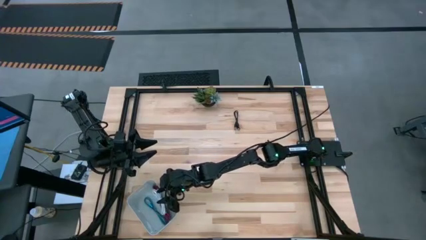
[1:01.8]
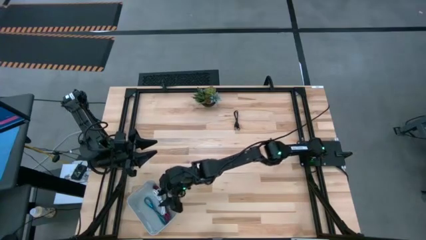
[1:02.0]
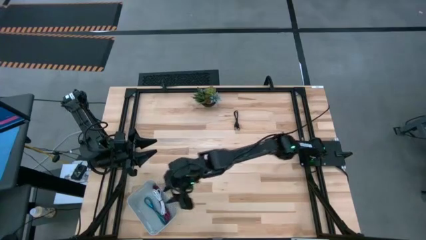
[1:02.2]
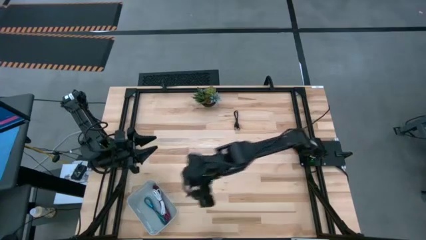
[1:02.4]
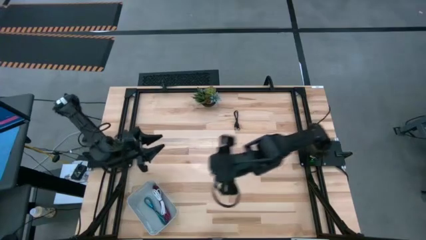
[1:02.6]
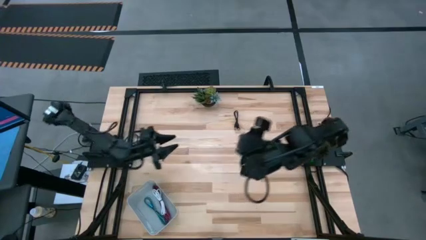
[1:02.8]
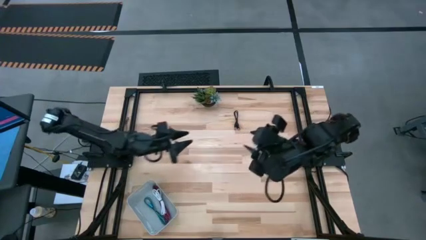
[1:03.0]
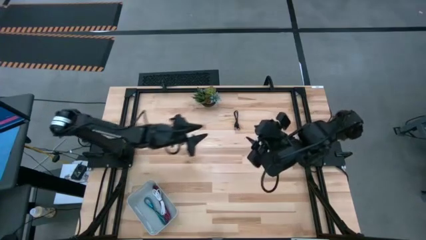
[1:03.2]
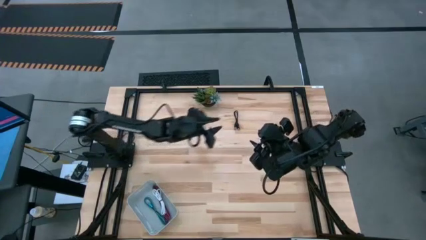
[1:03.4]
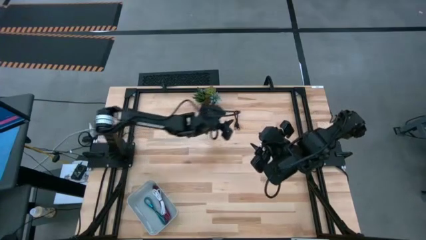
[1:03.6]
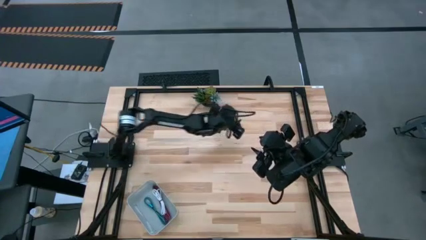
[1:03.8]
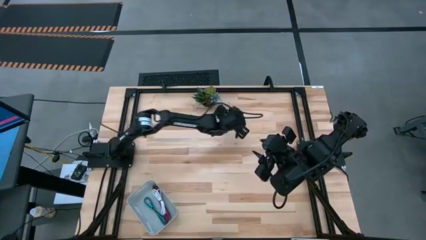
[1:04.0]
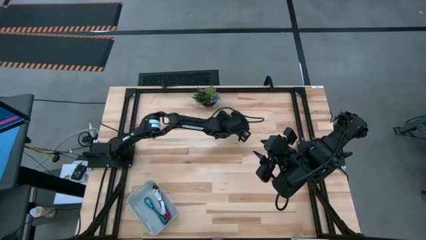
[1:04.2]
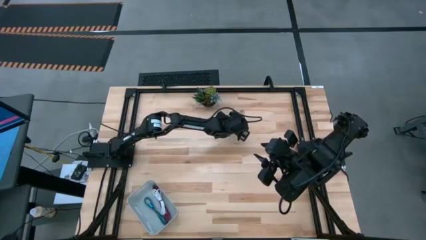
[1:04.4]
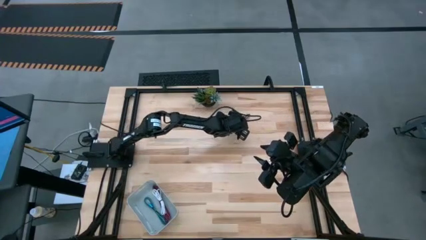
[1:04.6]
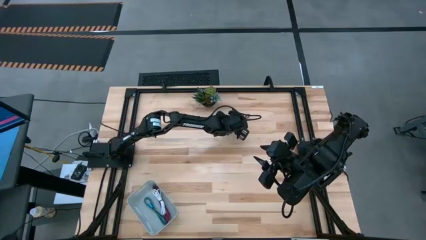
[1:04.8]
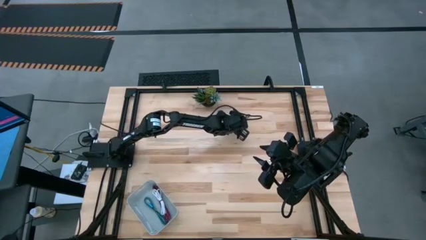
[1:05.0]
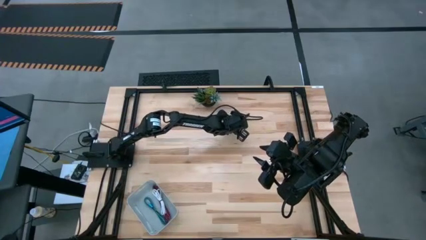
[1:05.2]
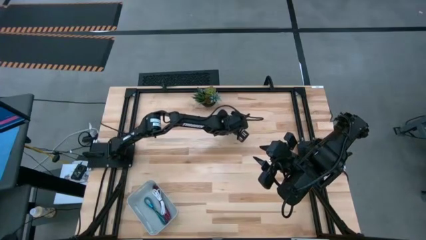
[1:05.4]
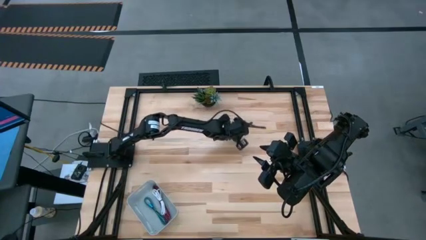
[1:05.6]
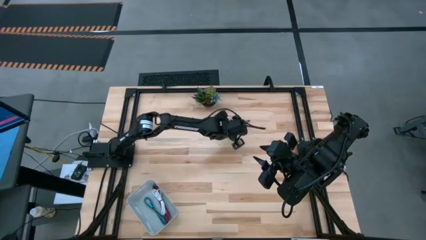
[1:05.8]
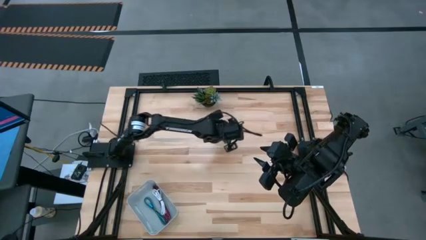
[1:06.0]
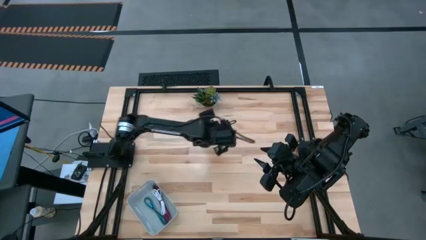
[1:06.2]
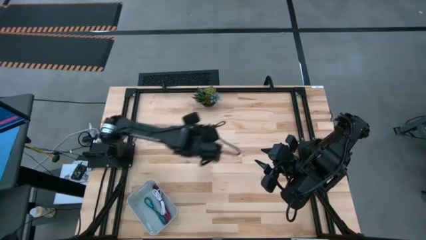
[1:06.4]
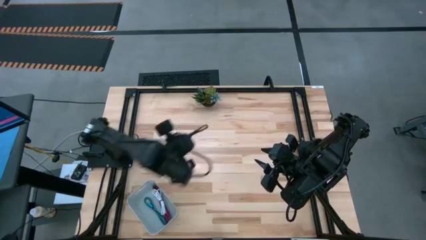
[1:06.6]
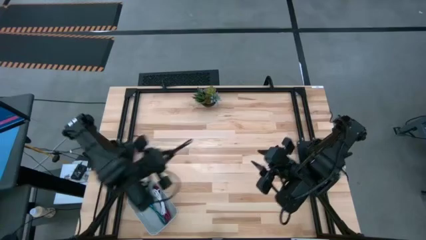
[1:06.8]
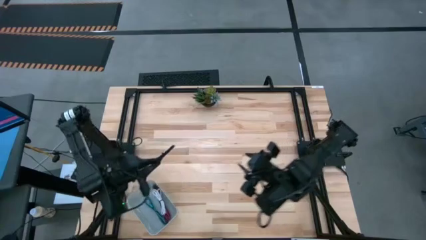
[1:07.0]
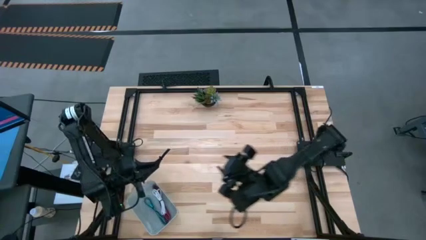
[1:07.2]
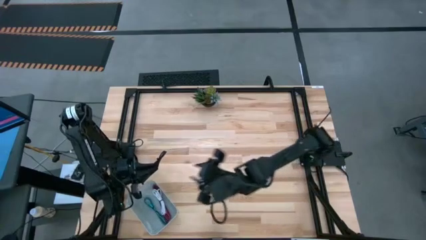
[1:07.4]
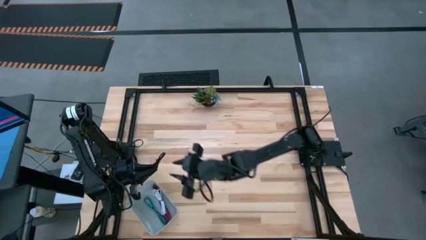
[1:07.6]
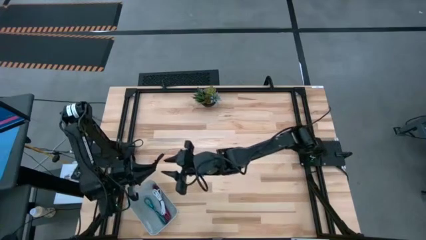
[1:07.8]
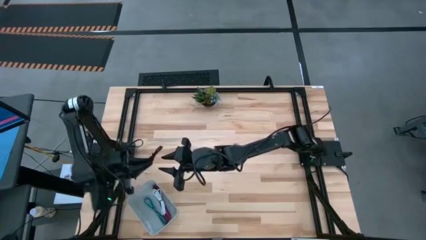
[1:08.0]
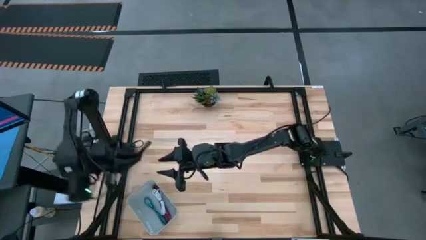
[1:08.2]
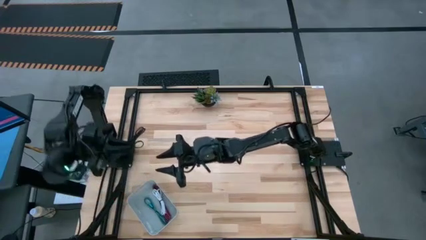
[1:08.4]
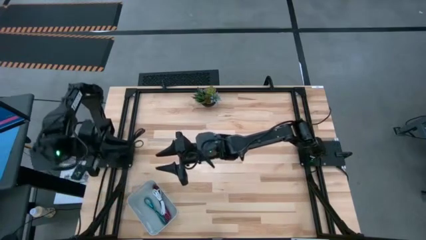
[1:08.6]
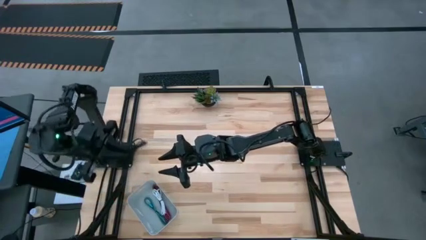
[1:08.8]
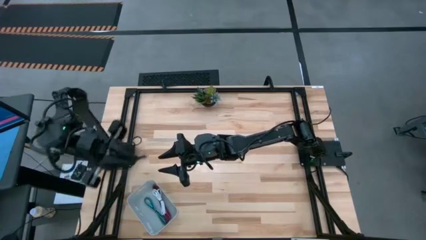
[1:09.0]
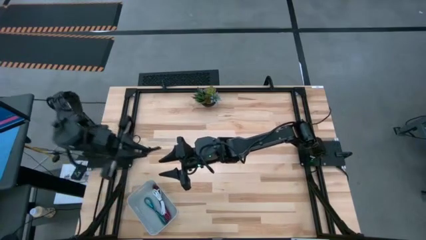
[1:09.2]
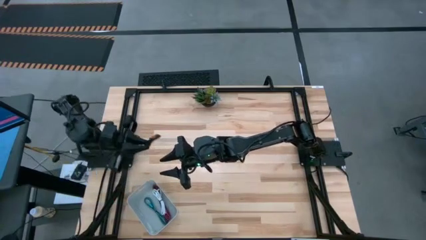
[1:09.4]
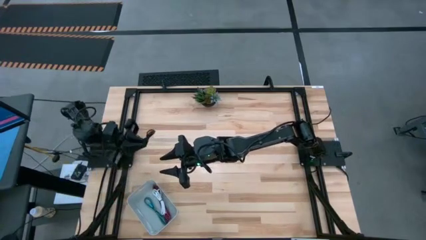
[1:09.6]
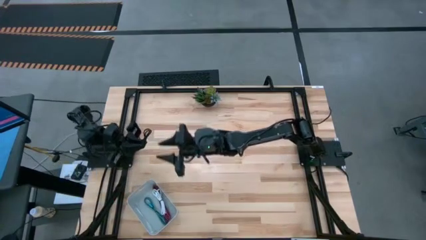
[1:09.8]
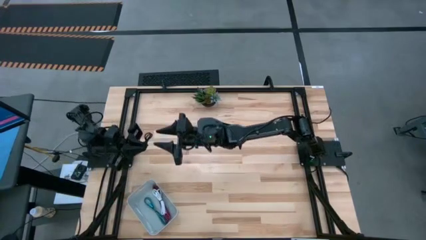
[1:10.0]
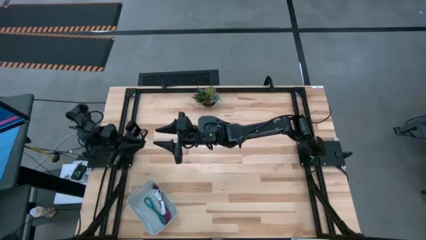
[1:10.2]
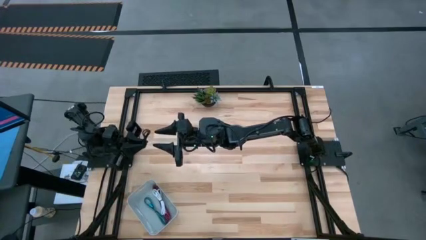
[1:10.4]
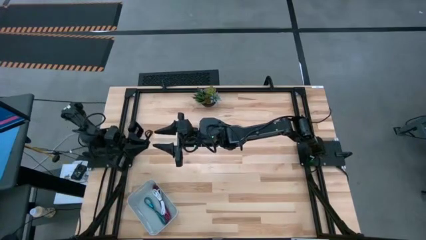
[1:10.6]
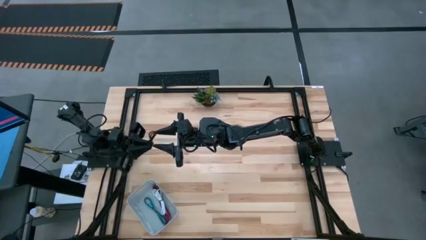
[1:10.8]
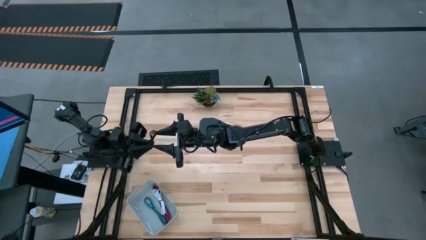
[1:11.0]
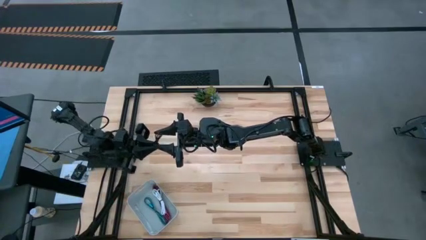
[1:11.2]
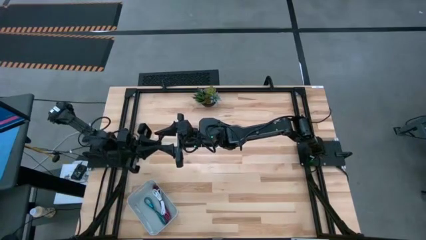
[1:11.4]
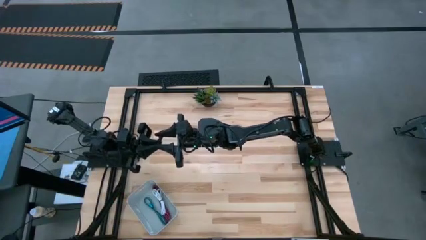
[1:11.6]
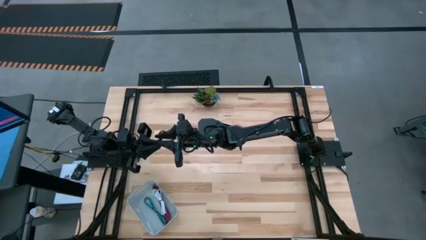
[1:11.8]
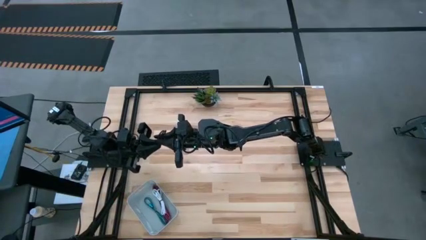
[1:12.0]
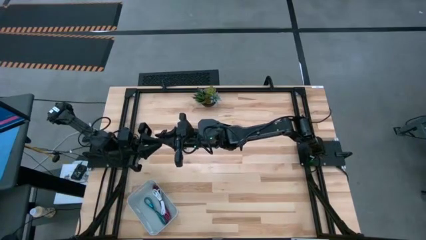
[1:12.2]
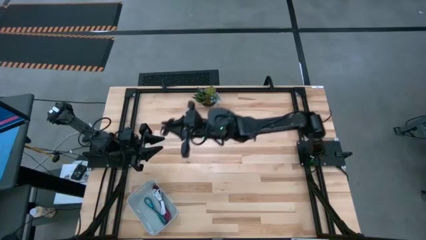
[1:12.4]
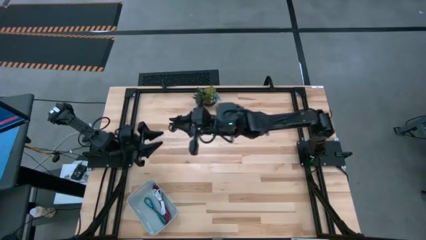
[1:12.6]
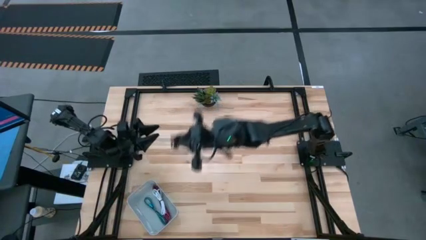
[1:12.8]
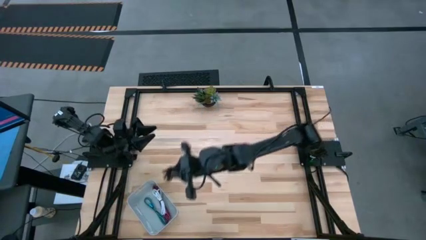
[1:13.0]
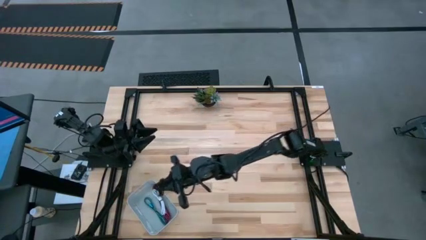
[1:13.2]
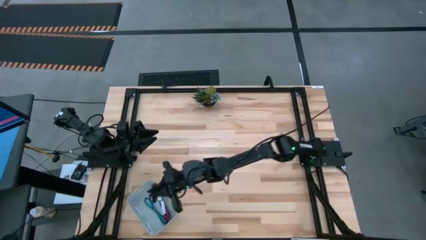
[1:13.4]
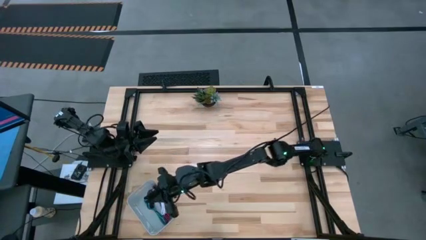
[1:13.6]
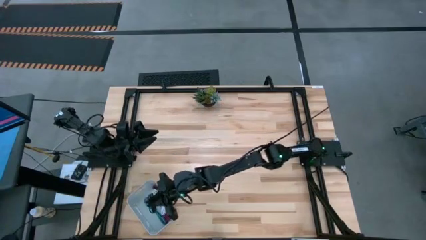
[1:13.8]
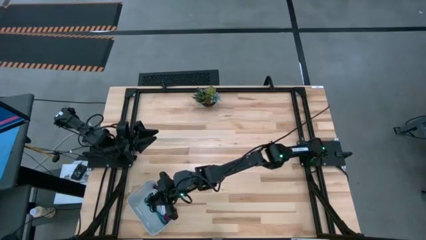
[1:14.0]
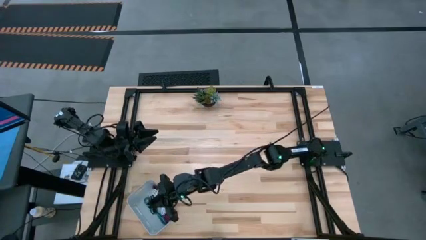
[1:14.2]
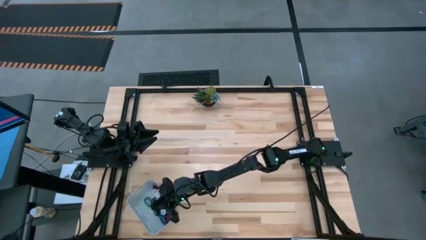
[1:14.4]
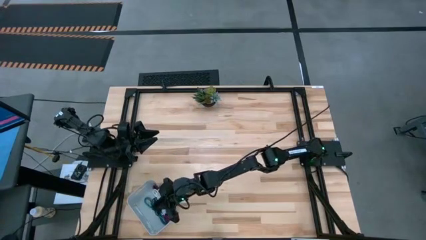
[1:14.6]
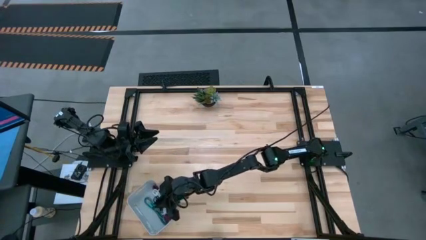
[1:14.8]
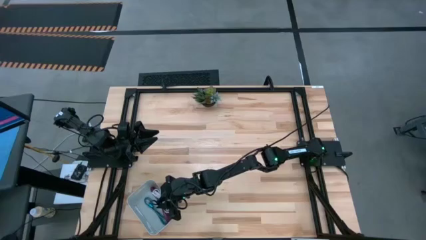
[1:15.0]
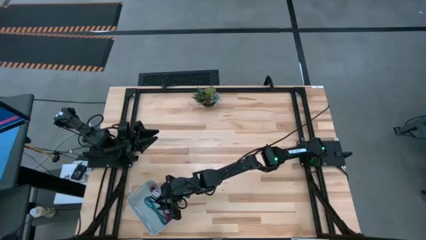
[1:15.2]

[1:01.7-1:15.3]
Task: Pick and place USB-C Cables
Put the black charger cable into the gray bin

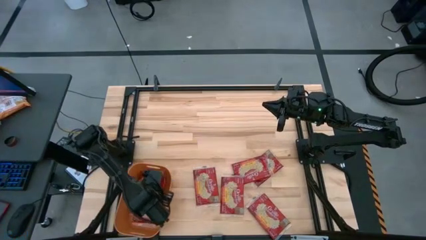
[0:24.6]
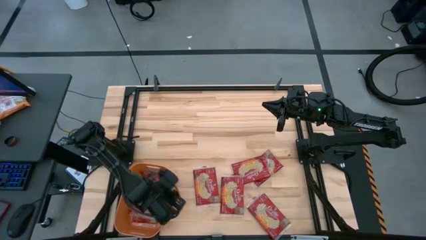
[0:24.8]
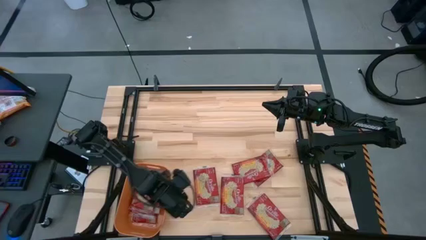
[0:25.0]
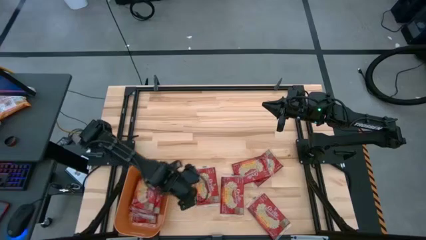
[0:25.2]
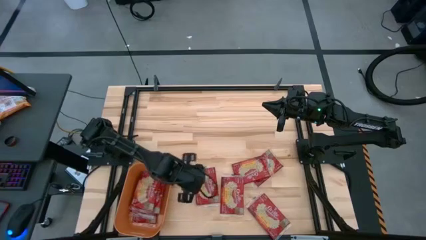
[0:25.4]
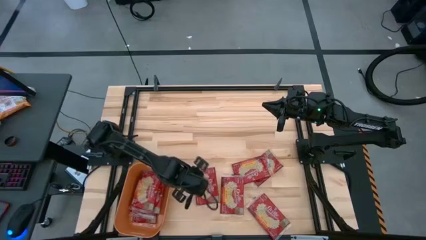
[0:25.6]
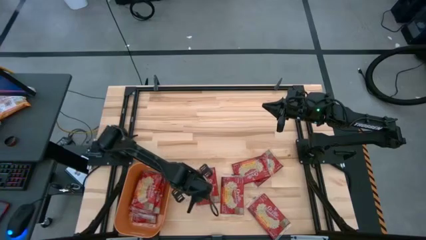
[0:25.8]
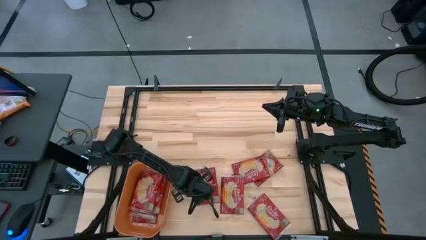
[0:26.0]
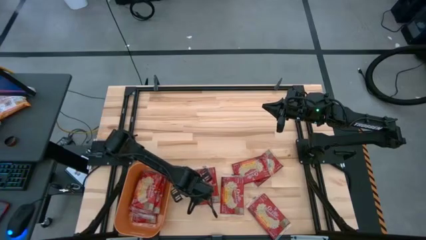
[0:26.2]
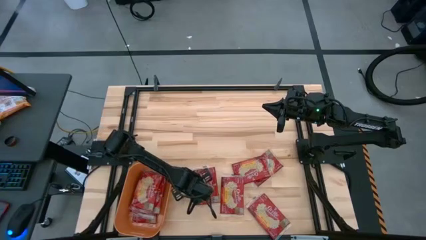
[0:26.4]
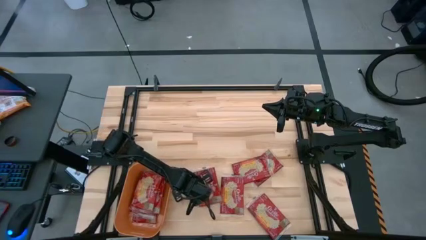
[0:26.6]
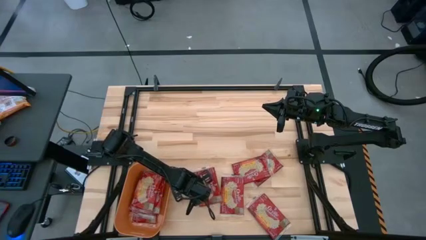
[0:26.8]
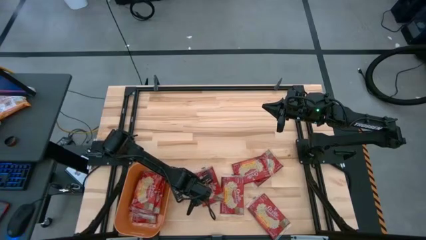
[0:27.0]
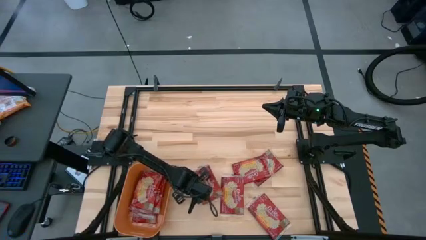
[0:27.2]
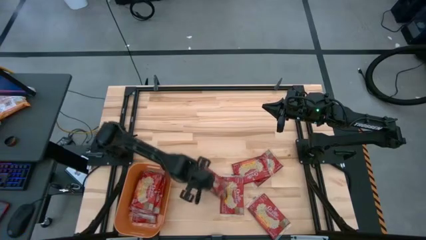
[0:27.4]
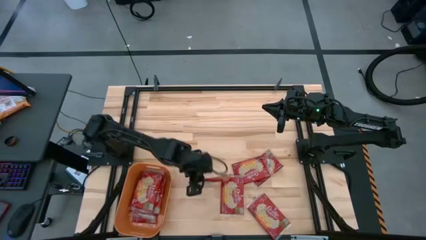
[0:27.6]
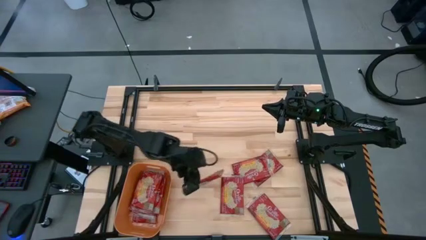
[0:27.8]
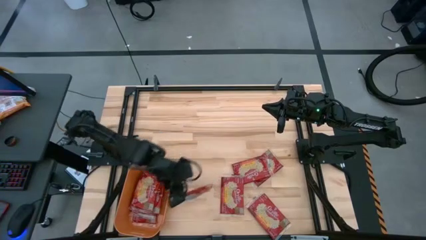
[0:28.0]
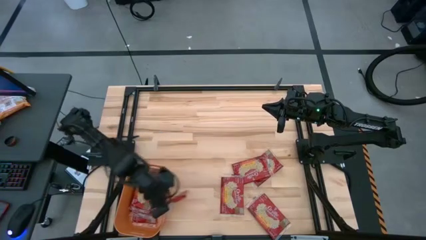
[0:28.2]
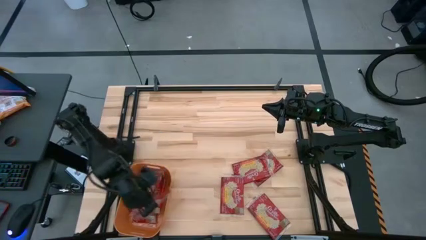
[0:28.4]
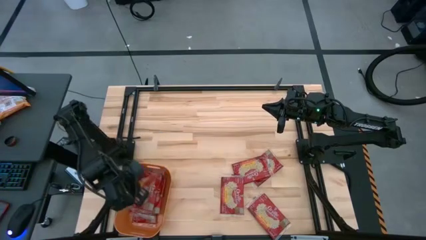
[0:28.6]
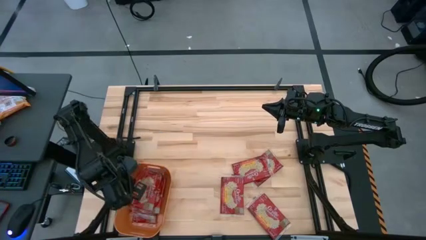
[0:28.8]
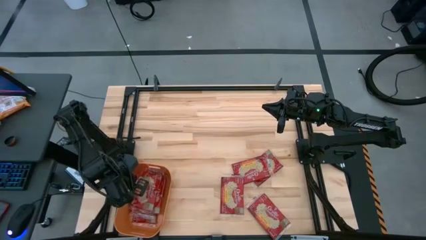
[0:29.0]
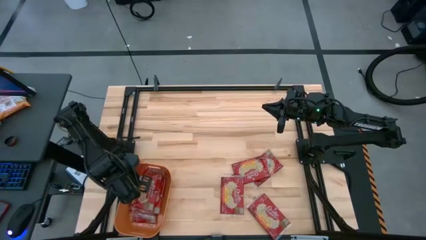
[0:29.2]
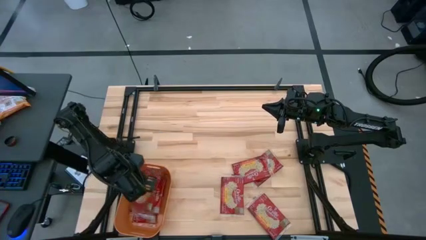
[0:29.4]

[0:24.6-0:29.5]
Task: Sort popcorn bags into baskets
Put the red popcorn bag into the orange container
